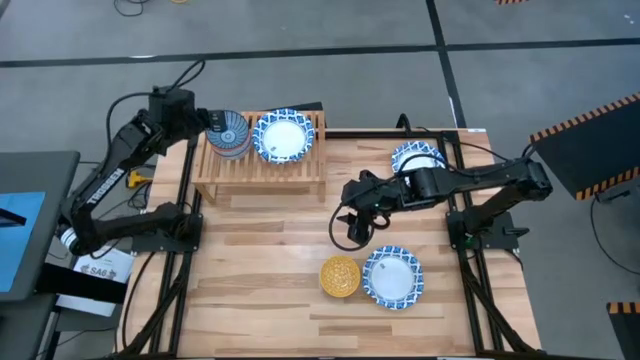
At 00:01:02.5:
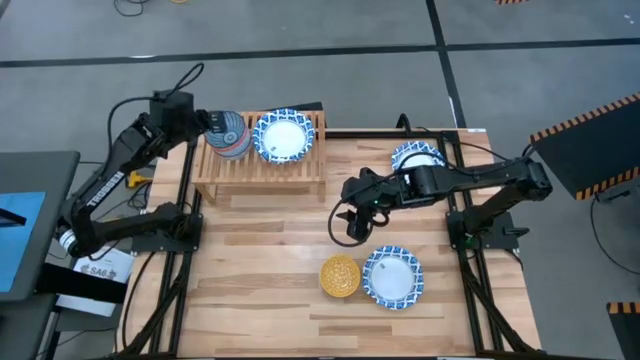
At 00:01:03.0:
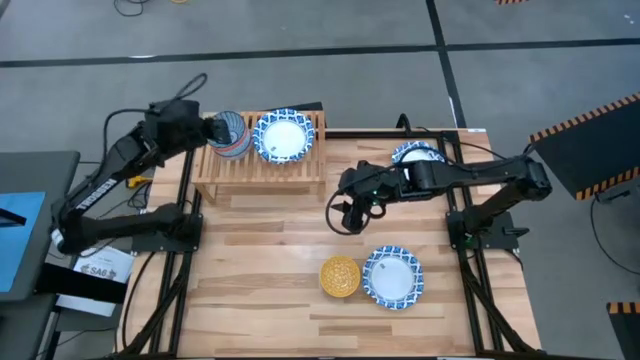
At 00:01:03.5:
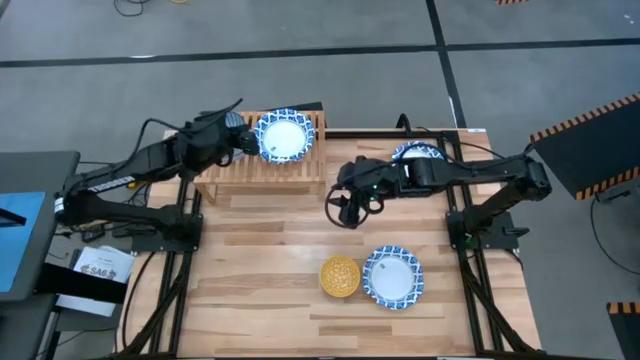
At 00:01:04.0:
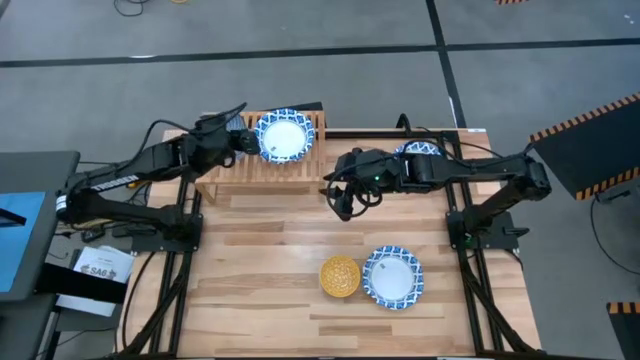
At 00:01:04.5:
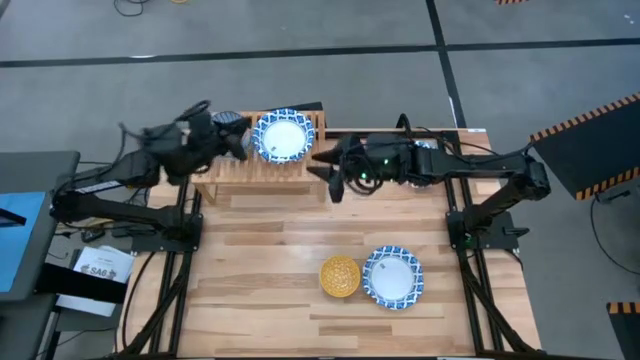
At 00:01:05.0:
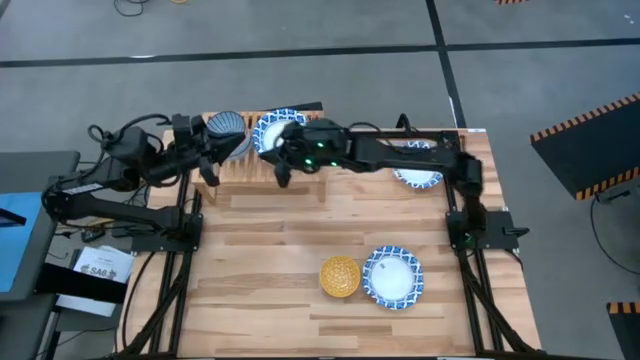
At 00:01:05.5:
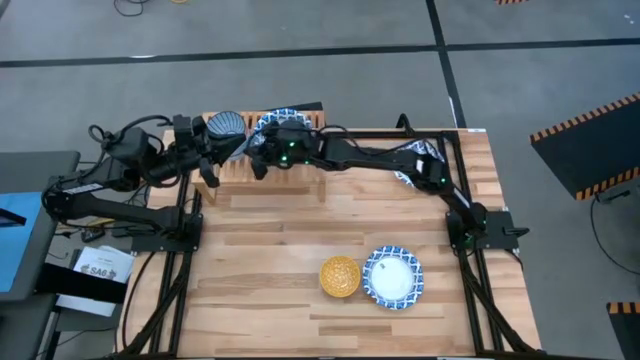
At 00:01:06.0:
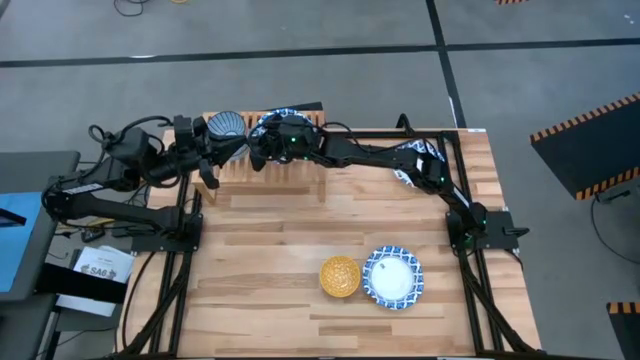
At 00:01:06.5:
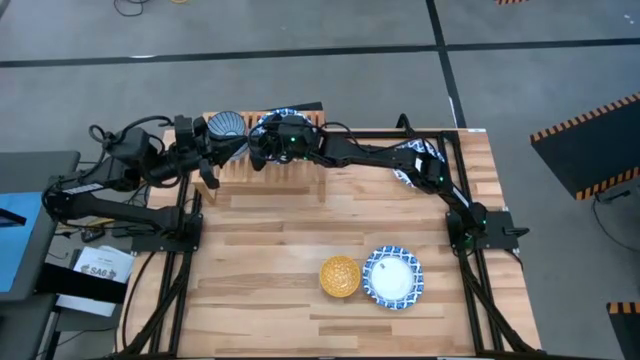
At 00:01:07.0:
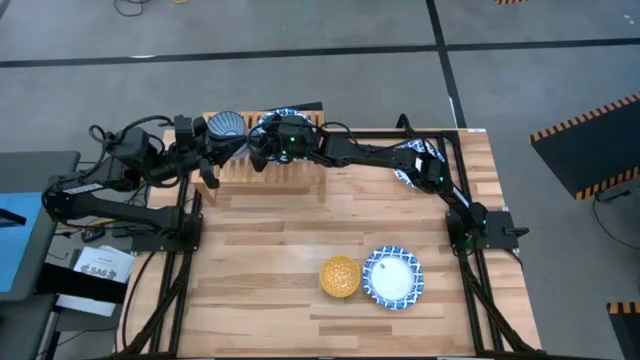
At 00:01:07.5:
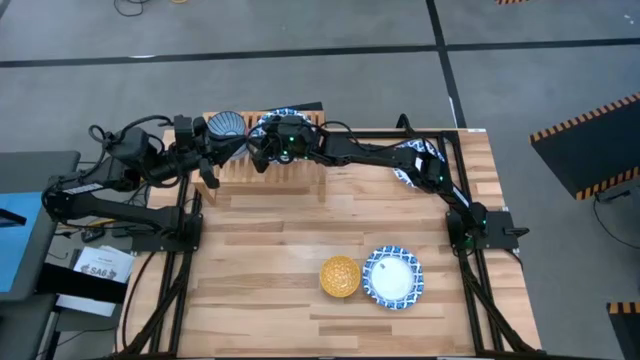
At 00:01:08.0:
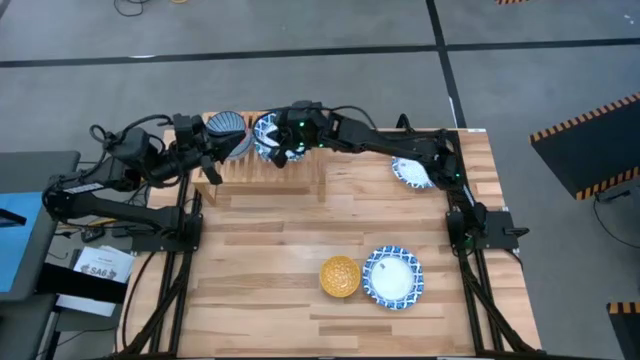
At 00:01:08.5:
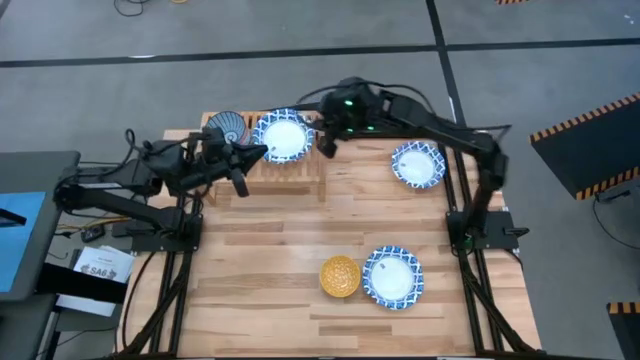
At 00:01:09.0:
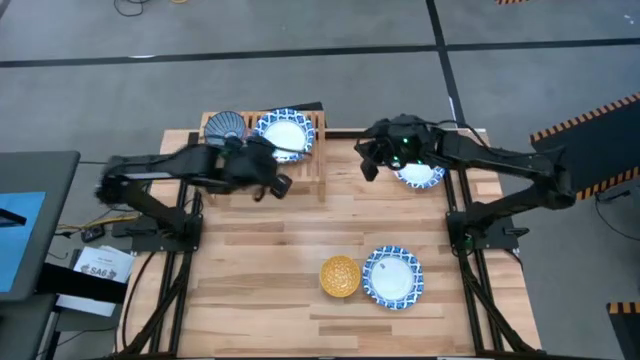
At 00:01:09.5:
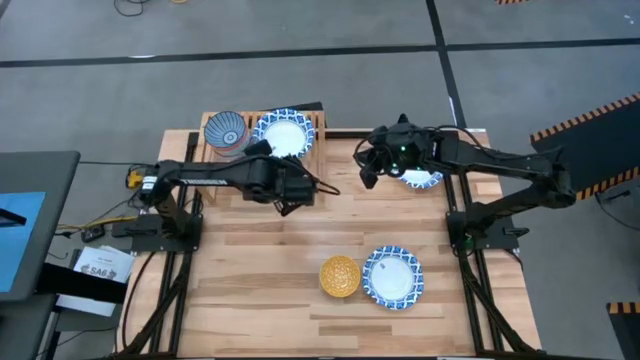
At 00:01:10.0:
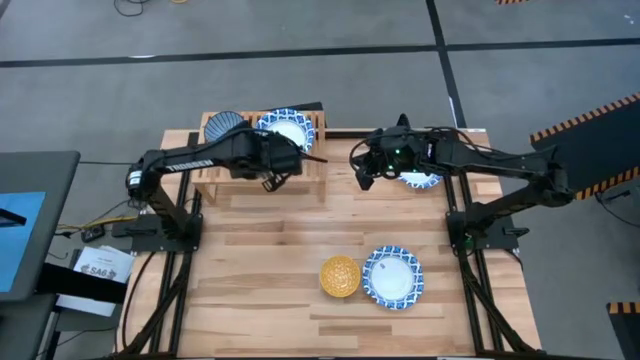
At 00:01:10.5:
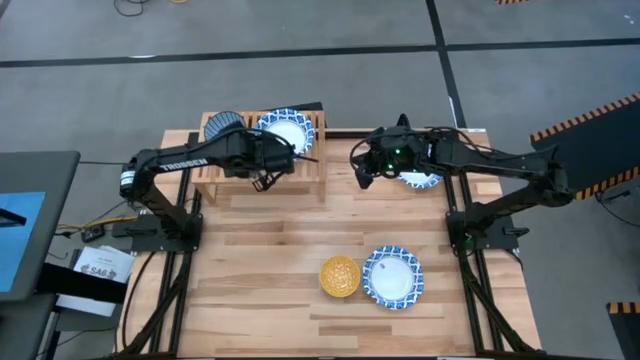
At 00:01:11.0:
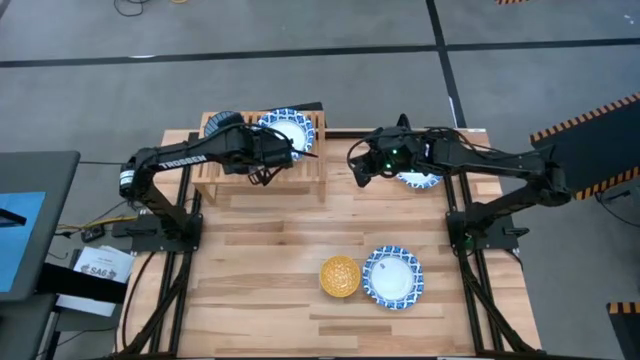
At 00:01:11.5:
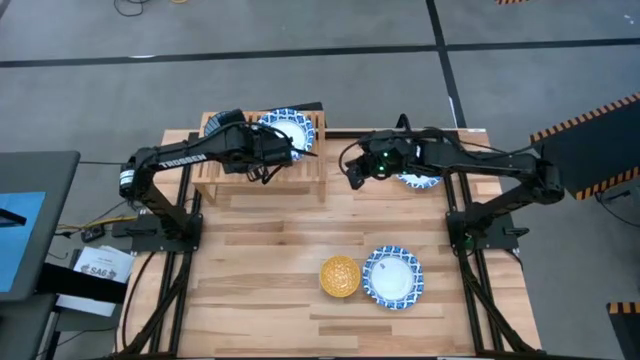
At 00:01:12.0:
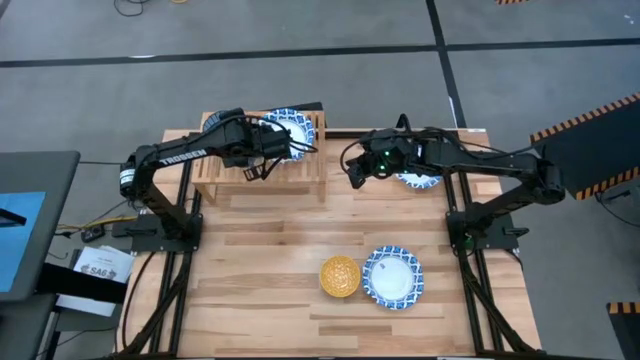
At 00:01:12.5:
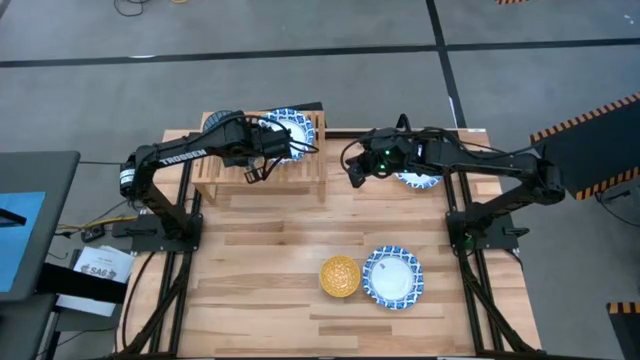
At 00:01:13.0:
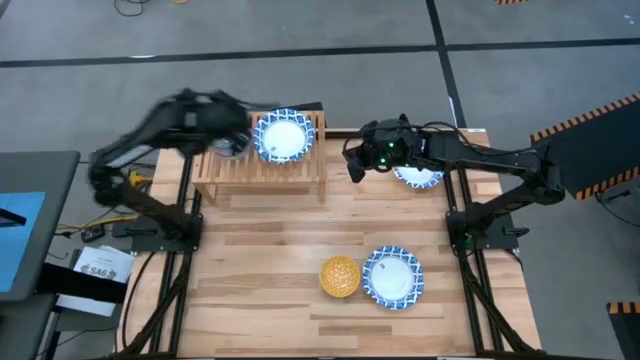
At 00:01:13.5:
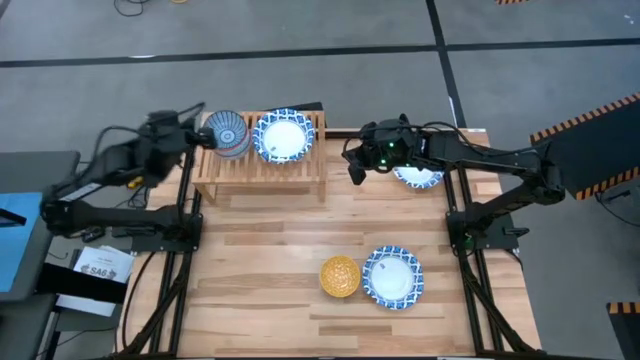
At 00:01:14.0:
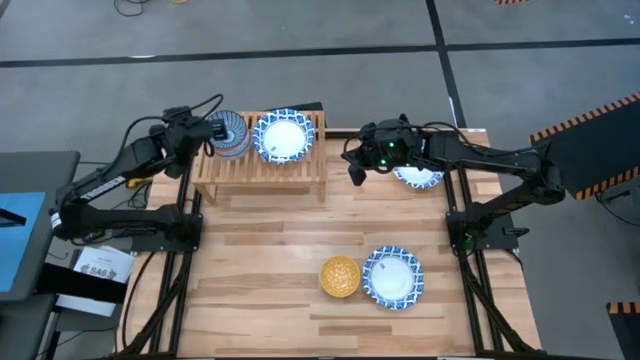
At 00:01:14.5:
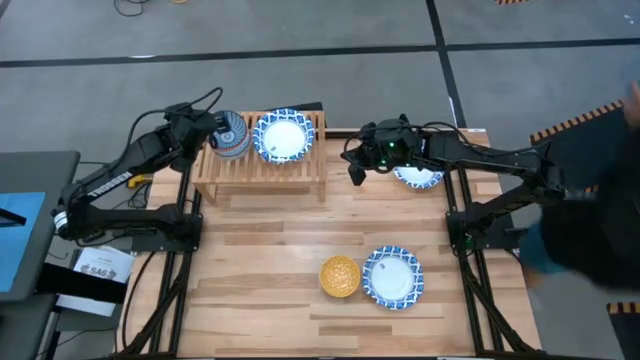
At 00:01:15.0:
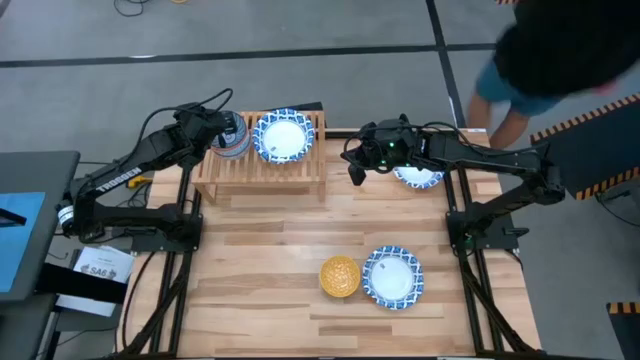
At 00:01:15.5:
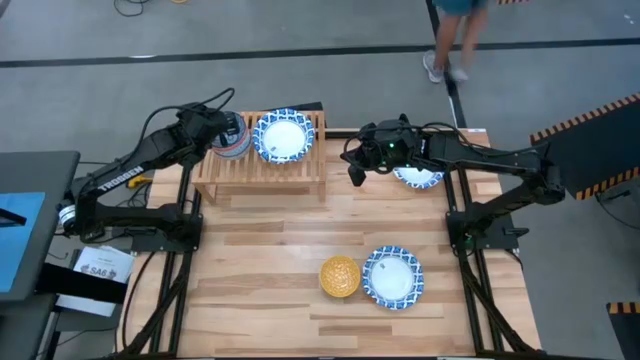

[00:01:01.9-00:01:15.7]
Task: Place and stack bowls onto a shelf
Stack the small blue bowl on top of the small orange bowl on the shelf

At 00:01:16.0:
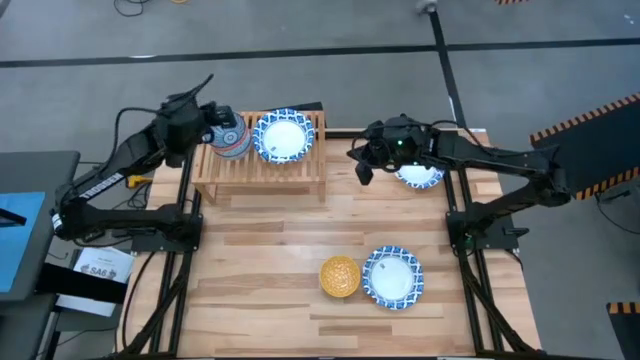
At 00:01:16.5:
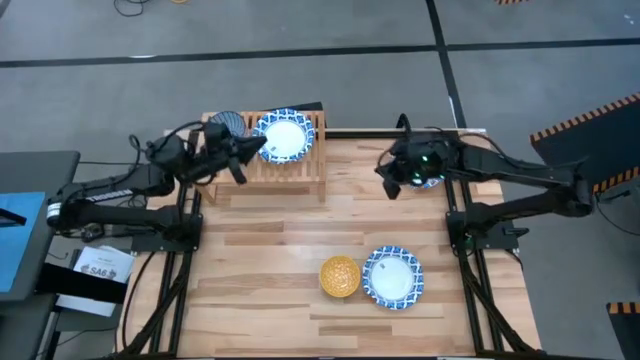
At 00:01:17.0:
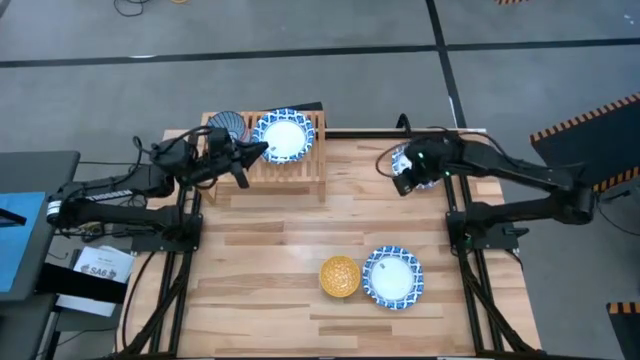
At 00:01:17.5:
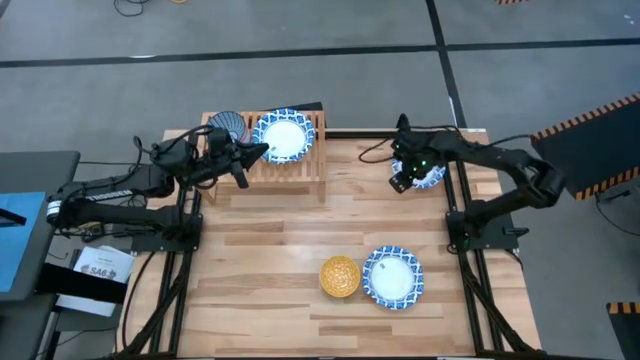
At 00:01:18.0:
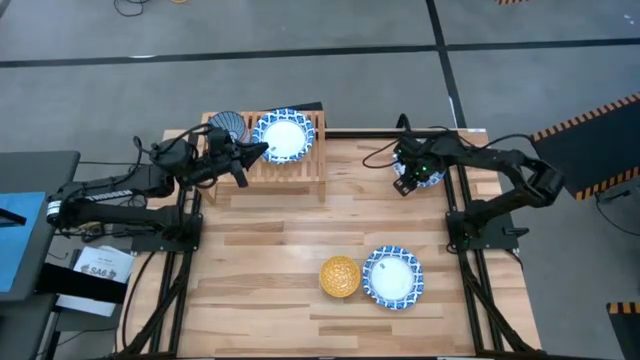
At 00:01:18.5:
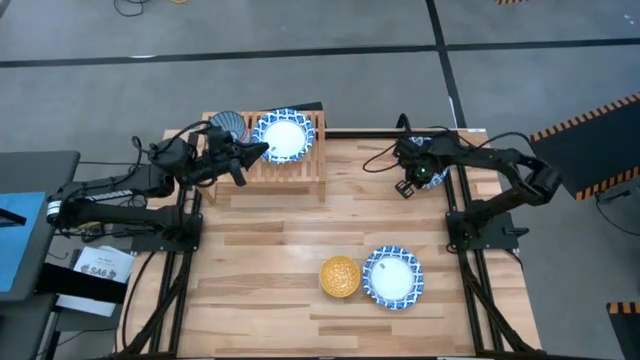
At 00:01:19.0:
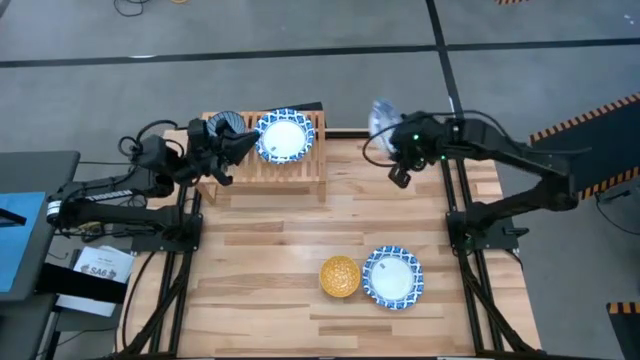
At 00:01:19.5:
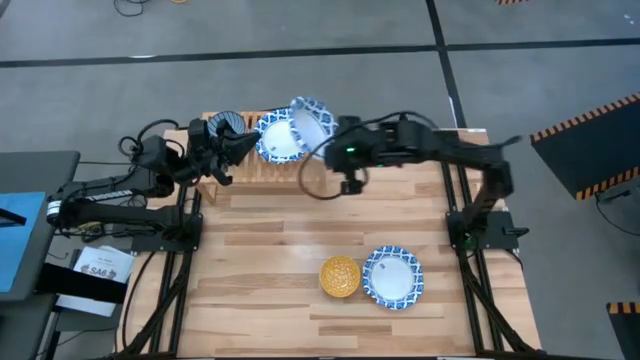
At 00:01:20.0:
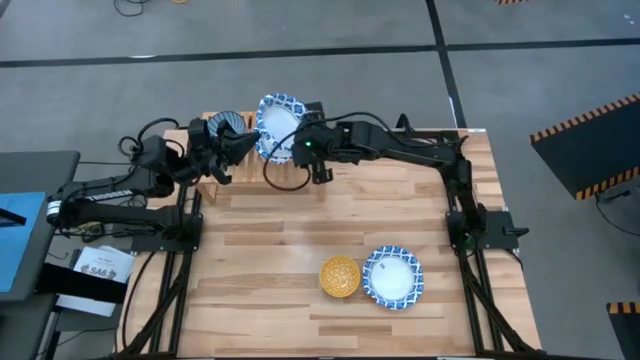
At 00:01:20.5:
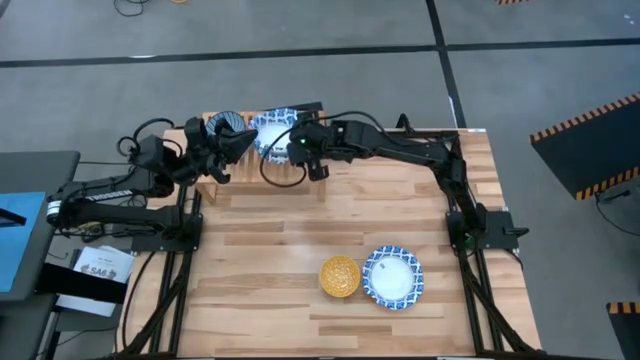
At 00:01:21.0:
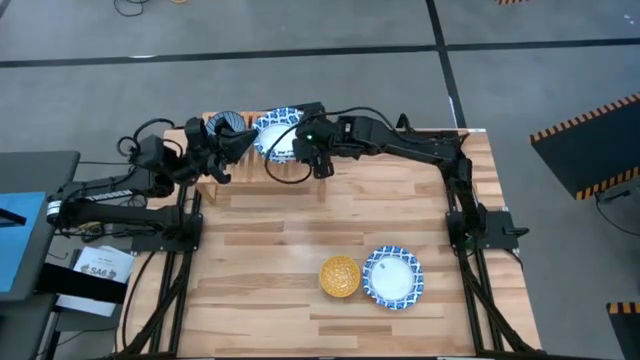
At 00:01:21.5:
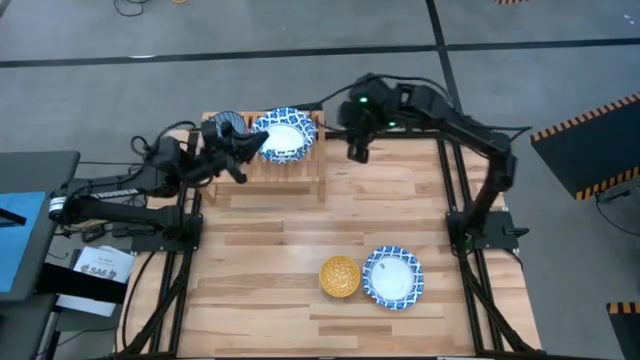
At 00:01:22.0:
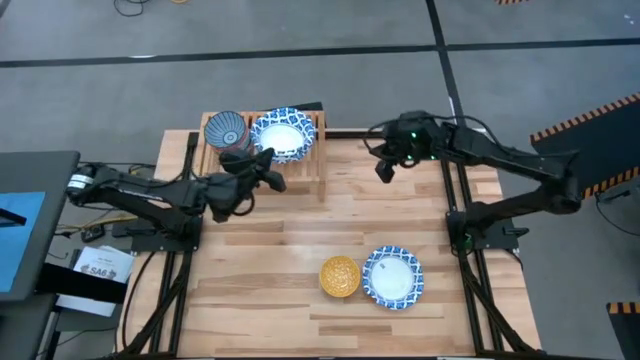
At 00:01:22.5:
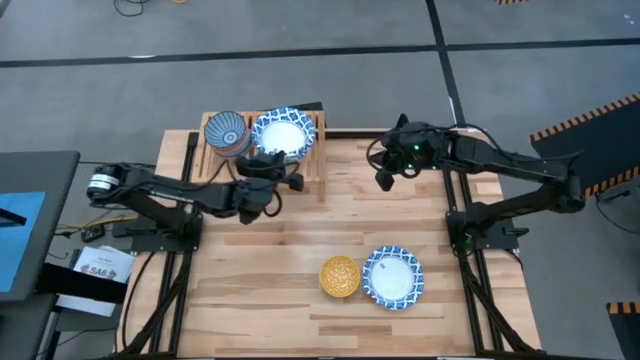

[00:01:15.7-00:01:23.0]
Stack the large white bowl on top of the white bowls on the shelf
